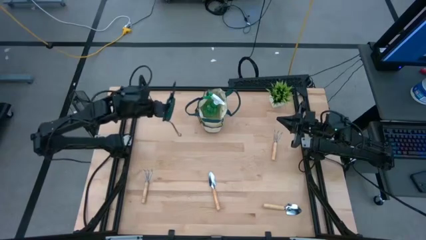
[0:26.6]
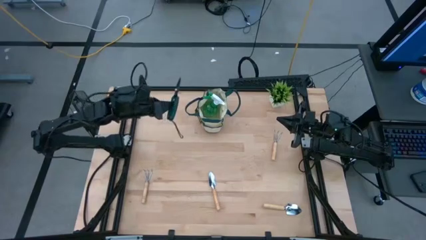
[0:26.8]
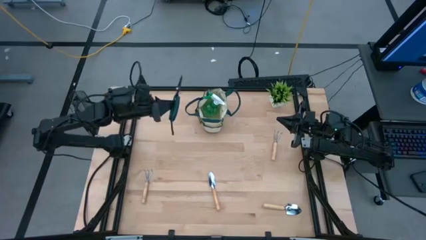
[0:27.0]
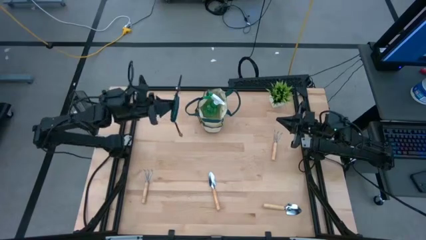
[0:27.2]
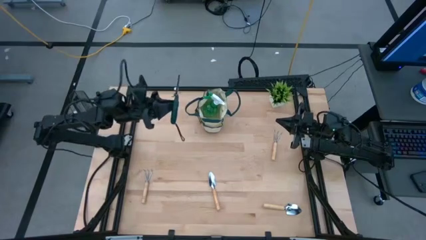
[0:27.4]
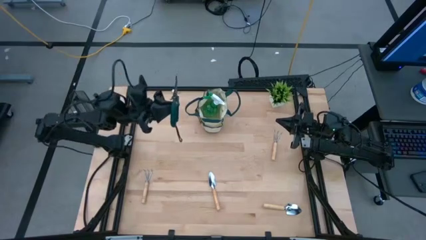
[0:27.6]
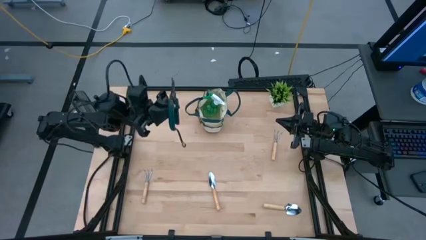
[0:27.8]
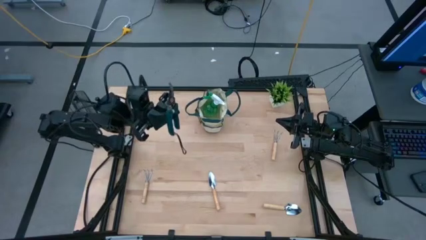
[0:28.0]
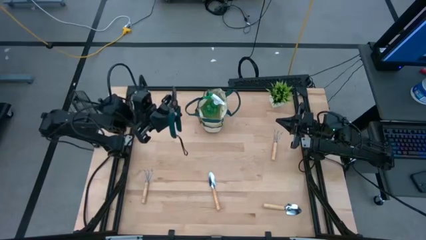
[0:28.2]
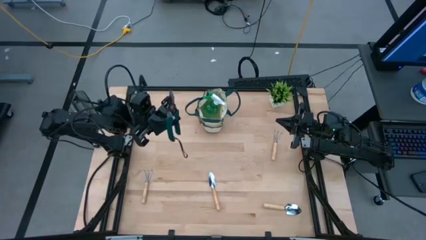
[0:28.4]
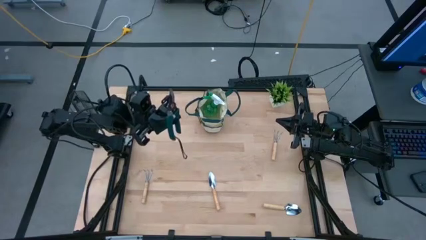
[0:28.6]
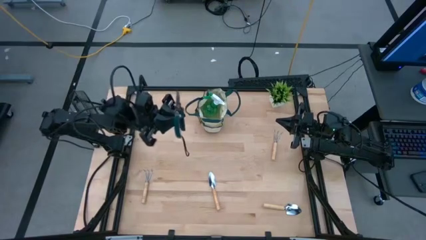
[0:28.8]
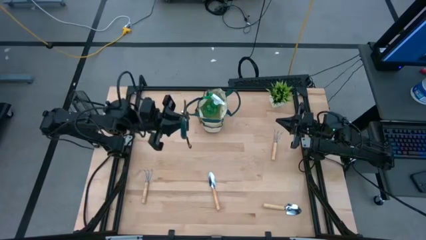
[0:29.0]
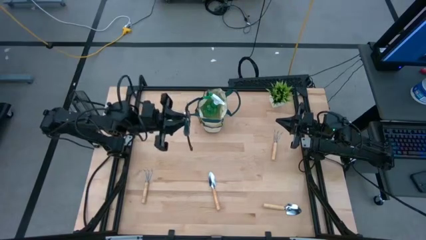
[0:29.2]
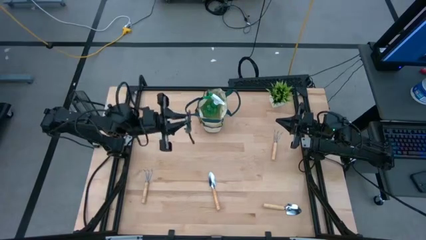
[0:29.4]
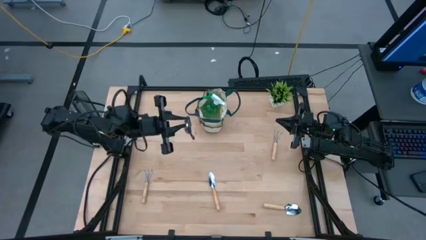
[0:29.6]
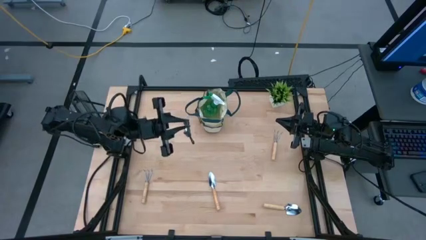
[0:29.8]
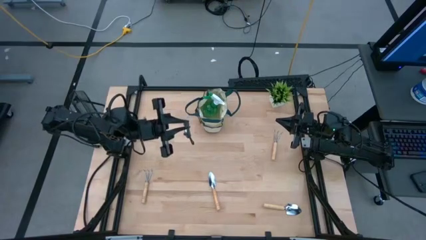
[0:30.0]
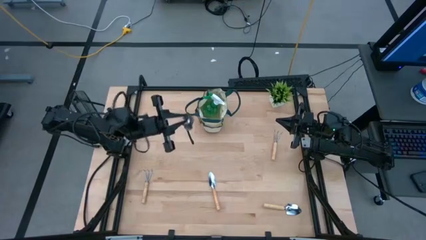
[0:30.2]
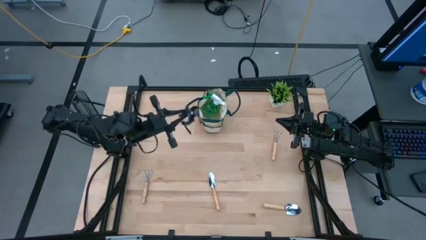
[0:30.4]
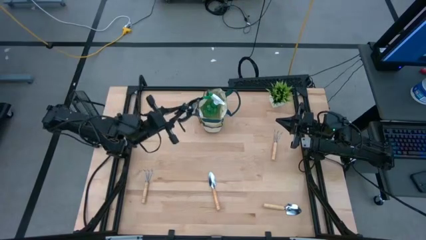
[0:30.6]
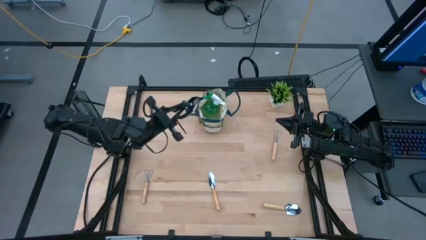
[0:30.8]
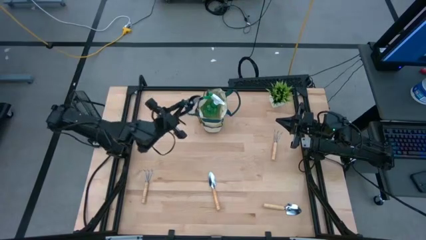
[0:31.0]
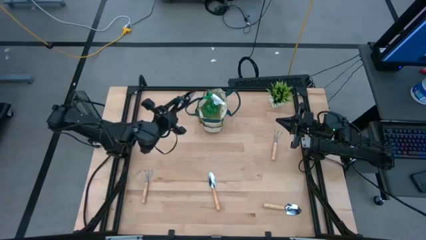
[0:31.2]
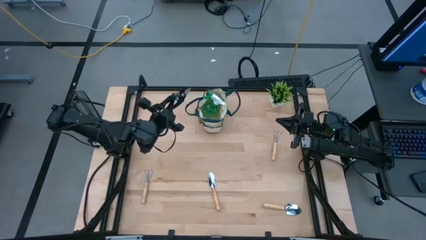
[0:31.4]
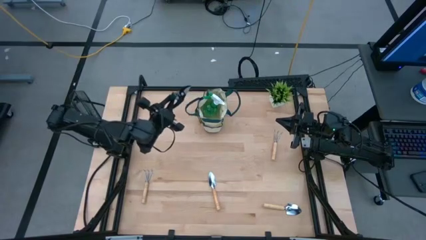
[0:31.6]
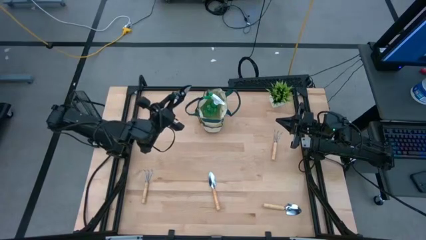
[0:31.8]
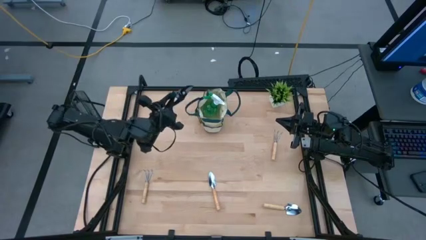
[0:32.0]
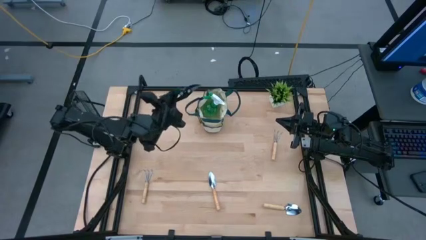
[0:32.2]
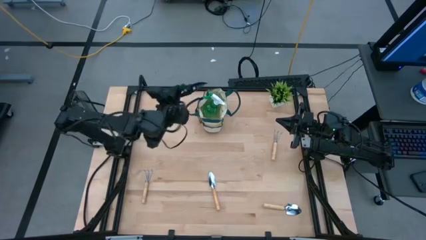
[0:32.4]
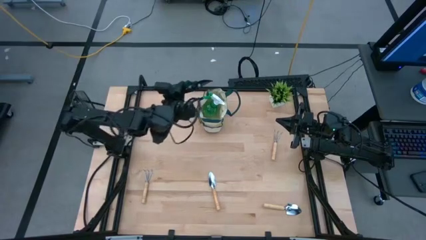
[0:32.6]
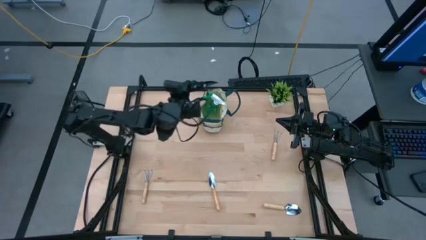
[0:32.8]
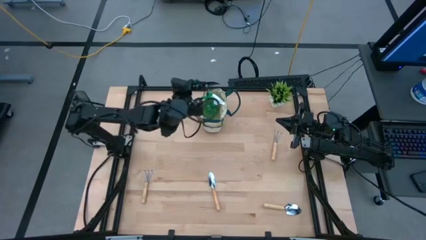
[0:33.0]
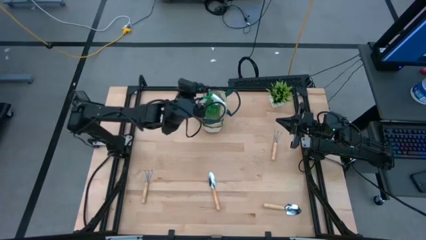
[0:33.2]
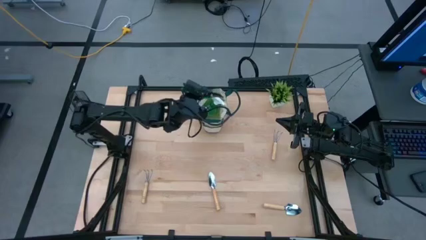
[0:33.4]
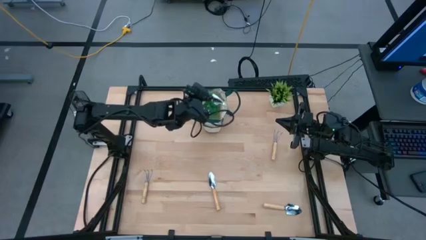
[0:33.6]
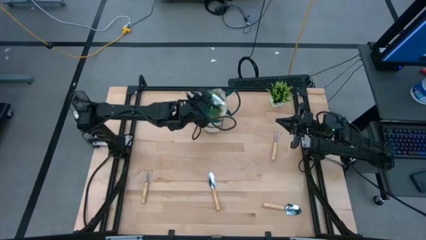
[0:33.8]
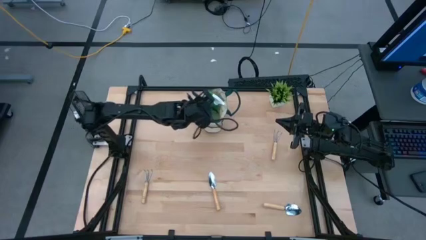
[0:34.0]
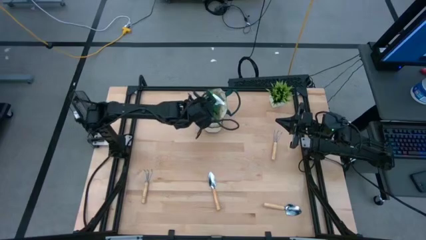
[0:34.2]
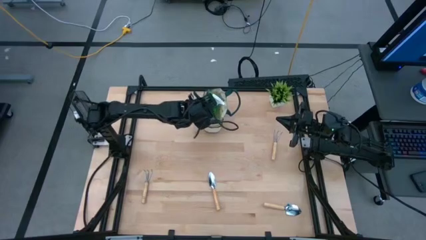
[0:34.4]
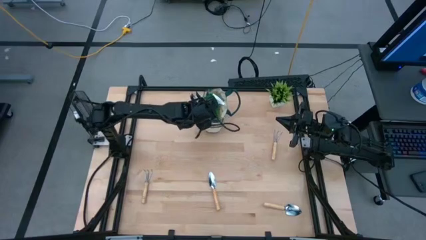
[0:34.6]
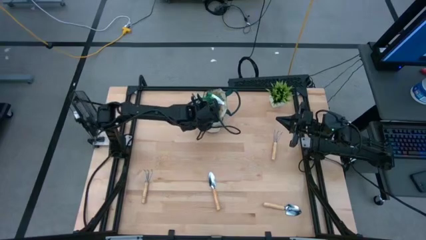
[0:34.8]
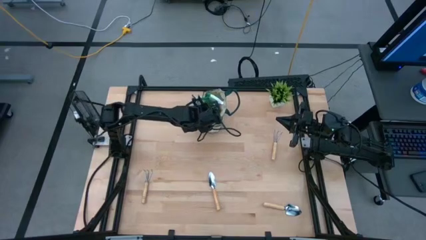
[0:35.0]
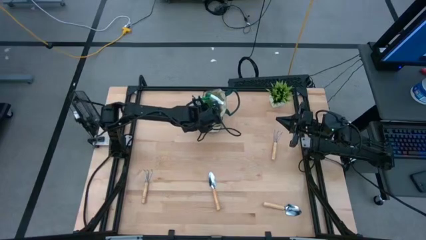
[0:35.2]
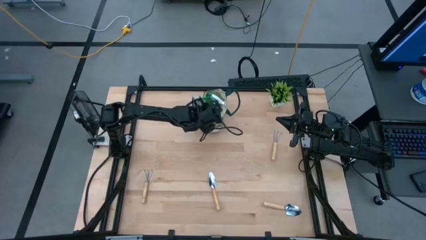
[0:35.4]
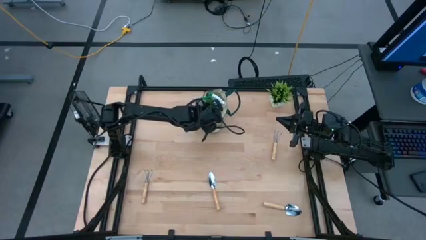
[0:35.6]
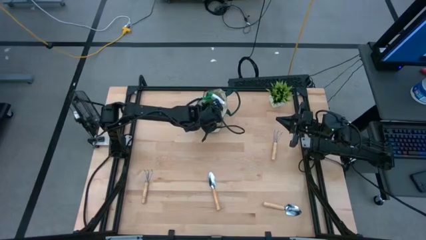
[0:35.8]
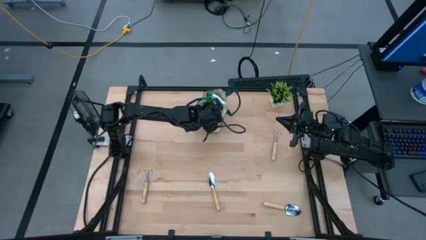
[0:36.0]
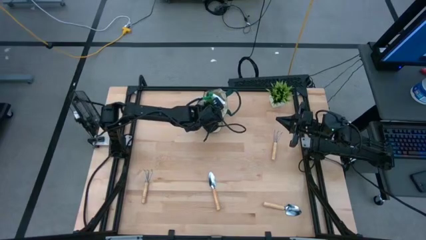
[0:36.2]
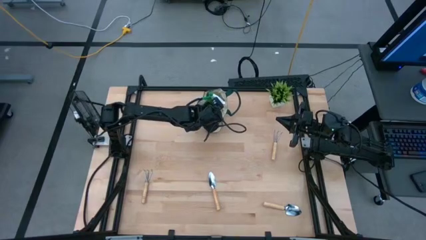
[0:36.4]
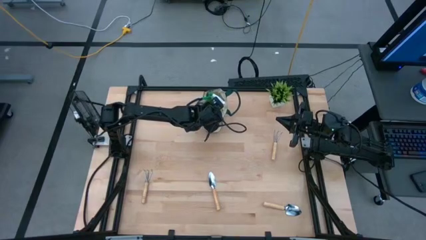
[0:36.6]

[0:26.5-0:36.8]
Task: Pick & Place Garden tools in Gardening bag
Put the green shear scissors into the gardening bag

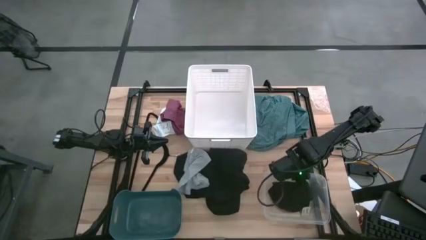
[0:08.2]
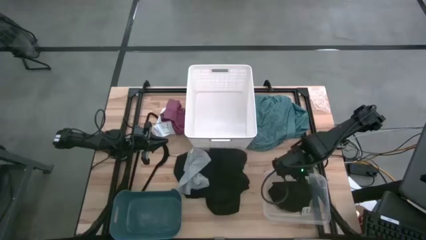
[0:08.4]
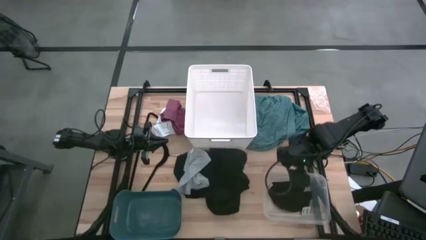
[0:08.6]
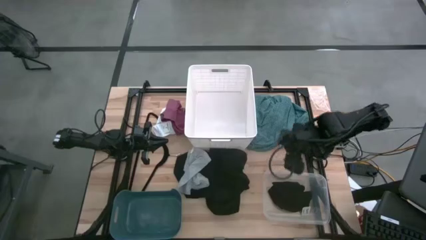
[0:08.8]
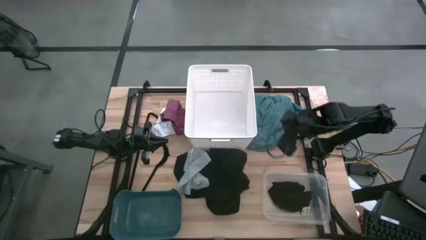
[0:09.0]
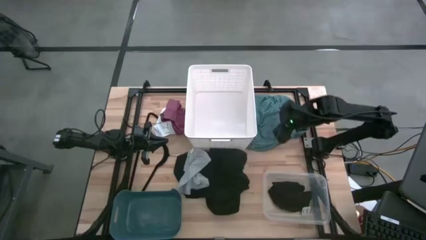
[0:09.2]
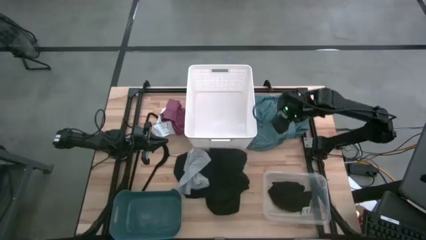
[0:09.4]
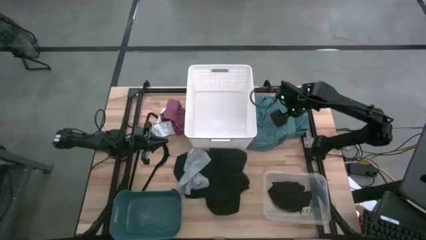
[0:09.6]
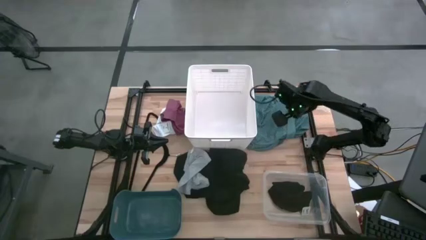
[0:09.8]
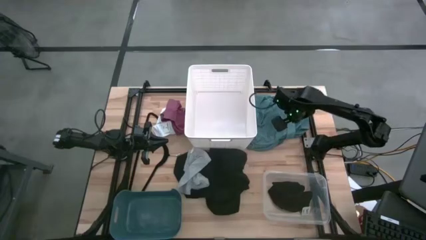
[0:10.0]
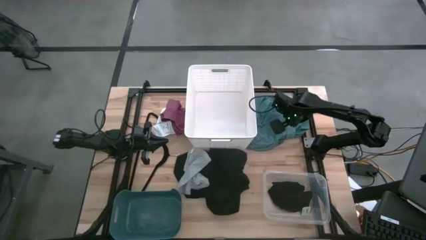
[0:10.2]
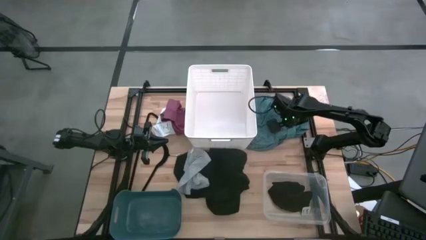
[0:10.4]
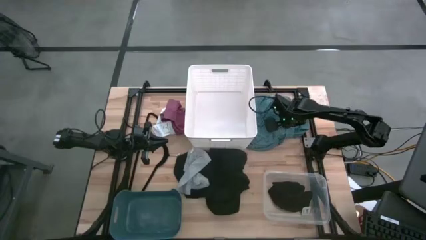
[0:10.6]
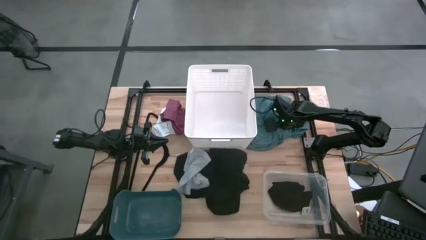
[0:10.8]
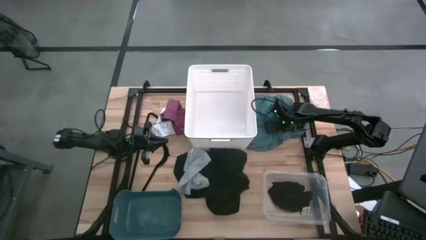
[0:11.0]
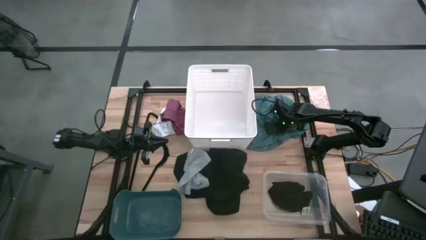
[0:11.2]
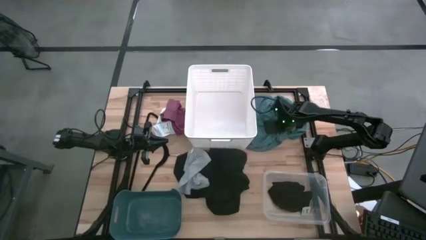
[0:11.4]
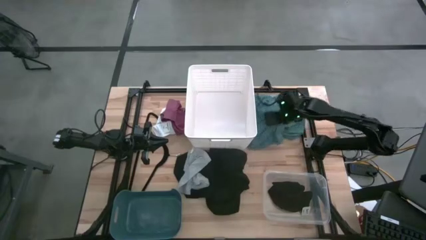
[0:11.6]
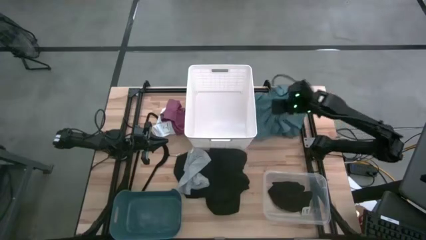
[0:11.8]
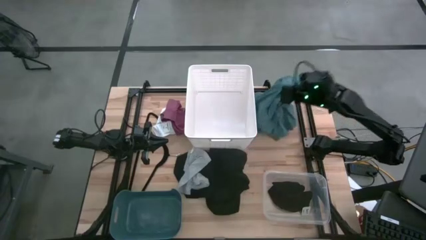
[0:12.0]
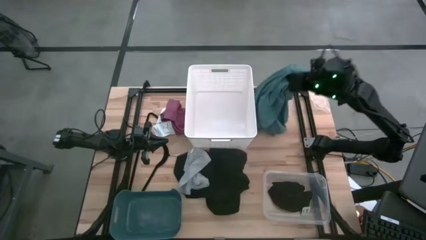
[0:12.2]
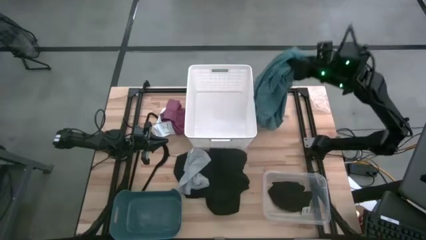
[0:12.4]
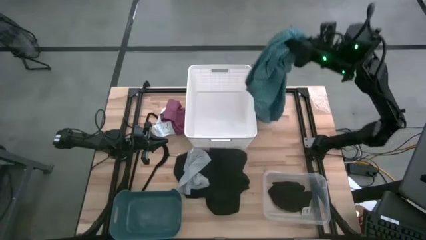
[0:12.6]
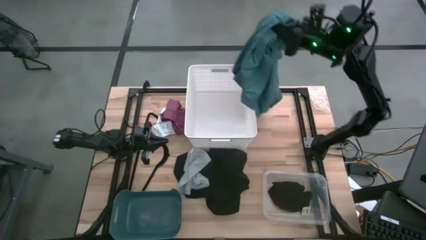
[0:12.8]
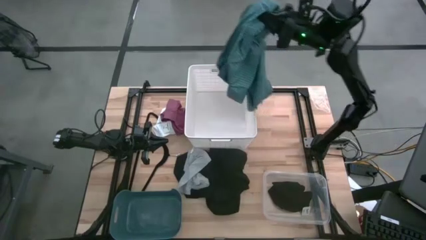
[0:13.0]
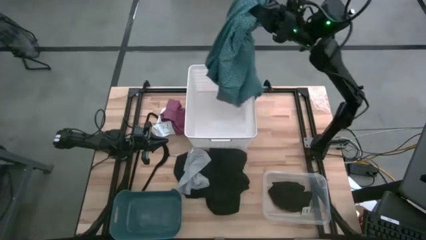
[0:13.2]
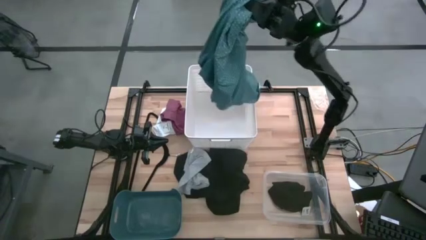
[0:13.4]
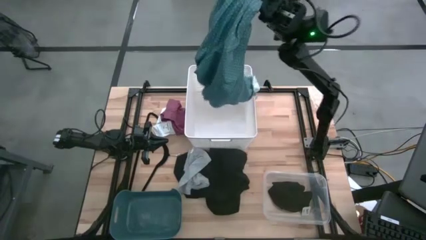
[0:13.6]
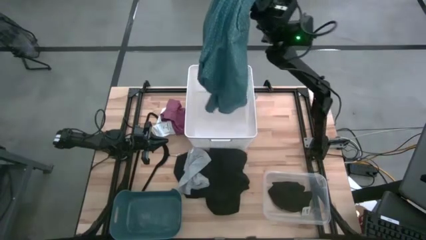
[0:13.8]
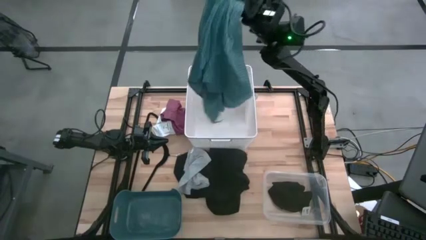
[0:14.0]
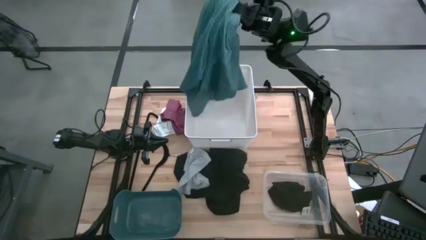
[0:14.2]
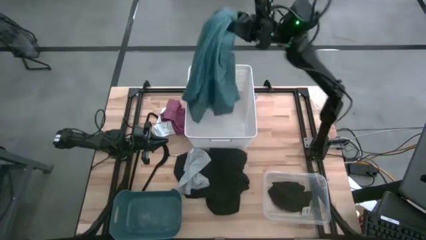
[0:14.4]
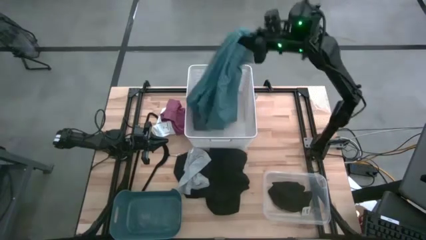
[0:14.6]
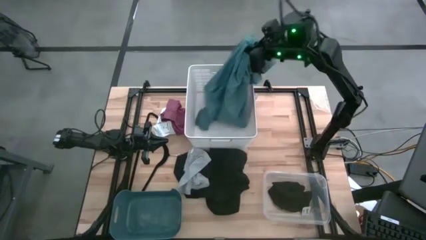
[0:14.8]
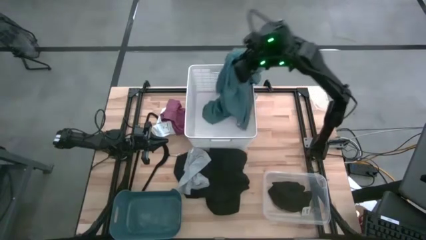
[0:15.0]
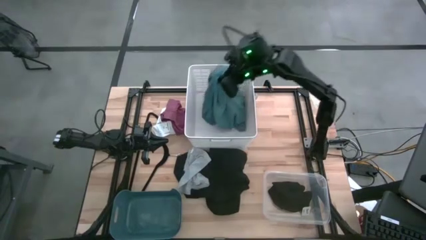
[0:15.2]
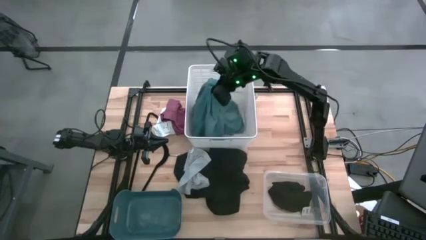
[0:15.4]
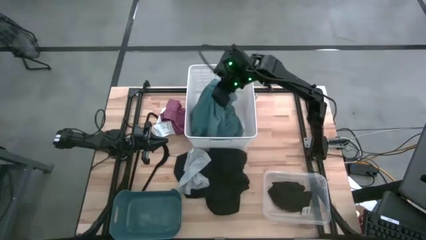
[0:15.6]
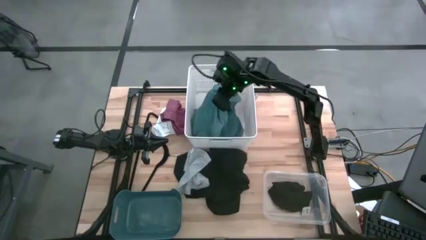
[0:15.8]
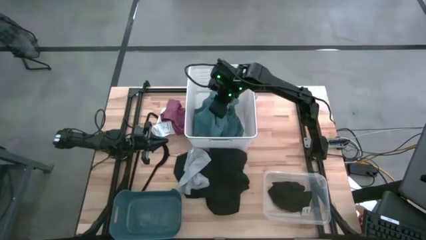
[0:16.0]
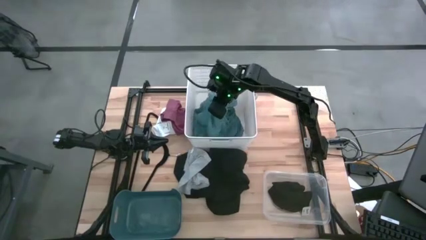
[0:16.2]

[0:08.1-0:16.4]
Task: Pick & Place Cloths
Put the green polo shirt into the white bin
